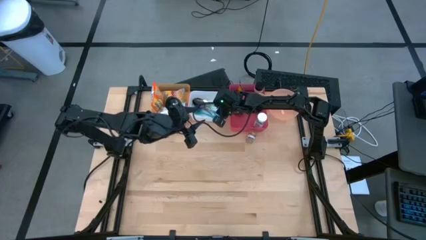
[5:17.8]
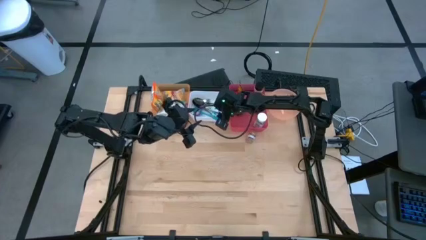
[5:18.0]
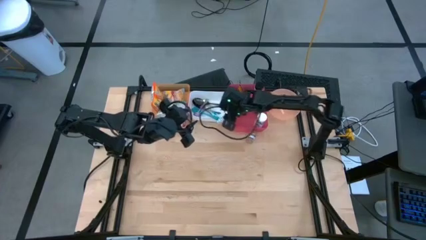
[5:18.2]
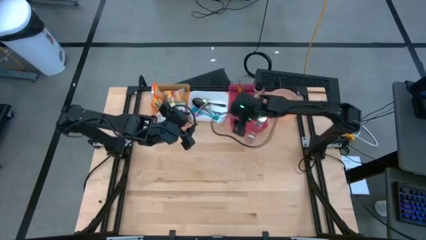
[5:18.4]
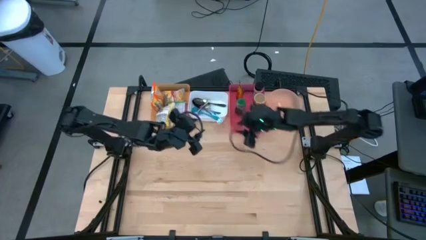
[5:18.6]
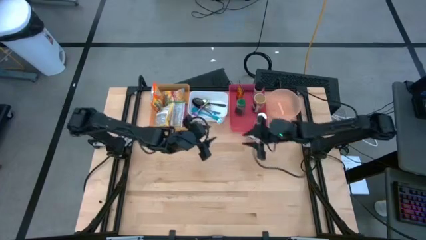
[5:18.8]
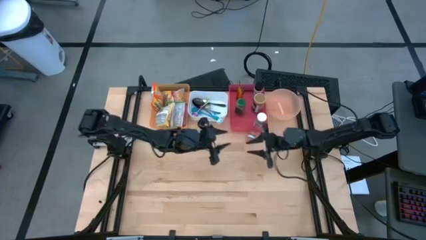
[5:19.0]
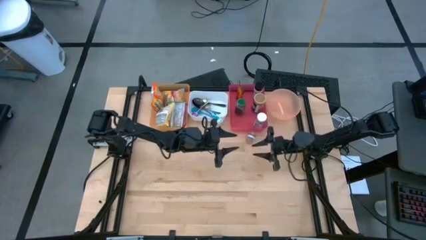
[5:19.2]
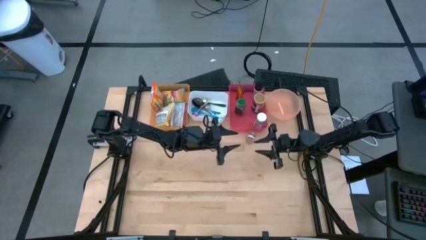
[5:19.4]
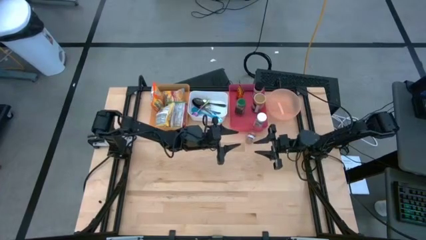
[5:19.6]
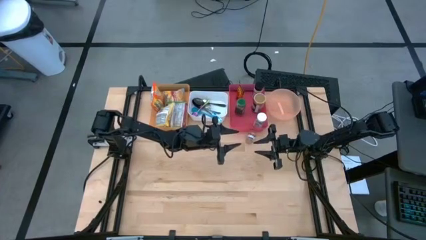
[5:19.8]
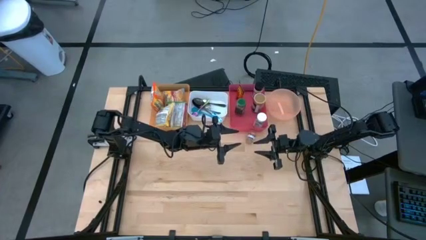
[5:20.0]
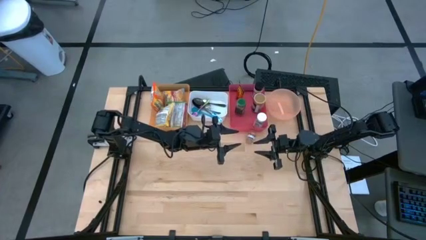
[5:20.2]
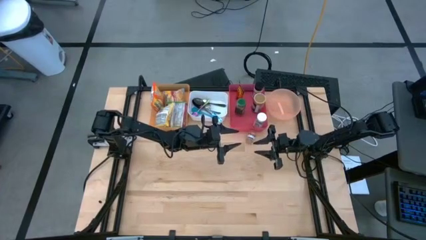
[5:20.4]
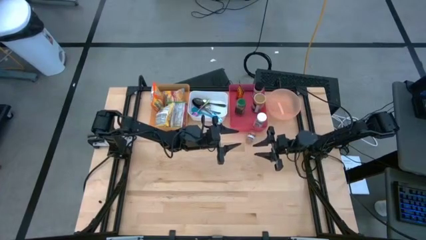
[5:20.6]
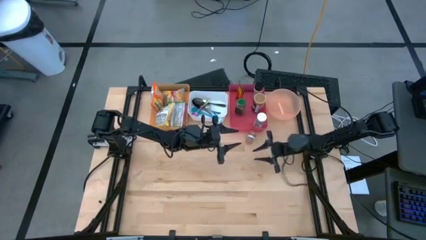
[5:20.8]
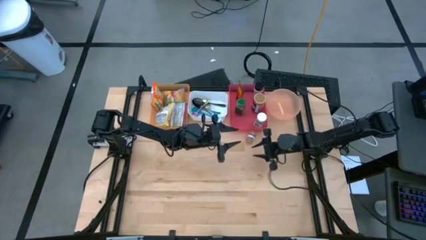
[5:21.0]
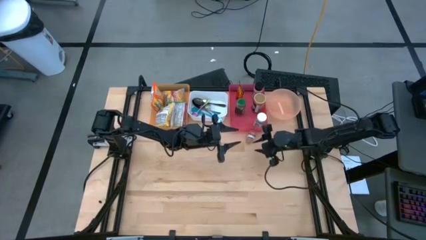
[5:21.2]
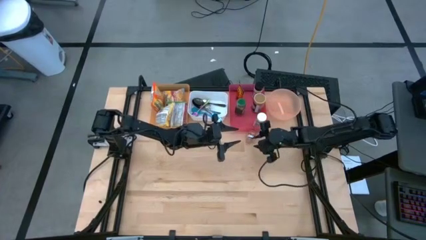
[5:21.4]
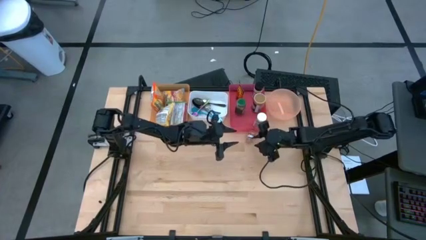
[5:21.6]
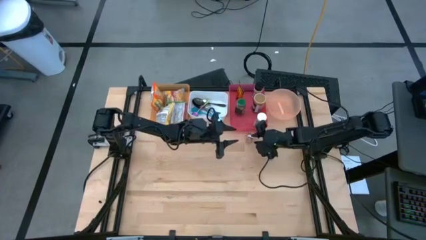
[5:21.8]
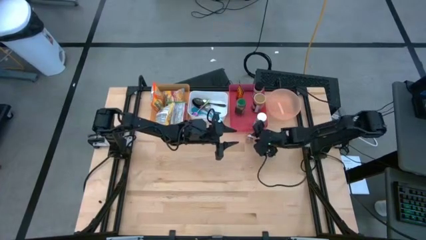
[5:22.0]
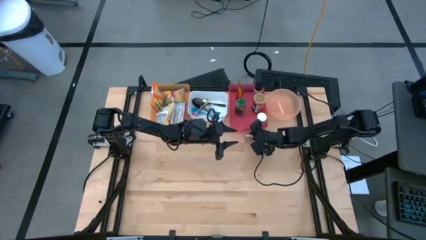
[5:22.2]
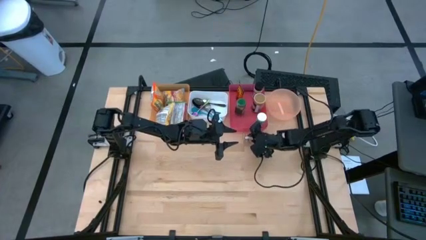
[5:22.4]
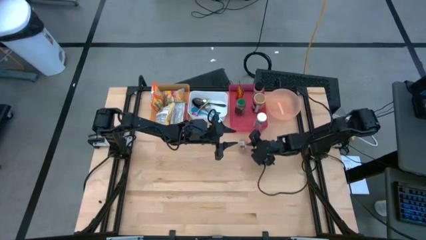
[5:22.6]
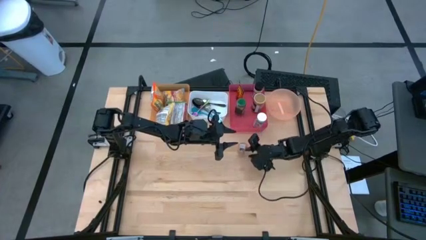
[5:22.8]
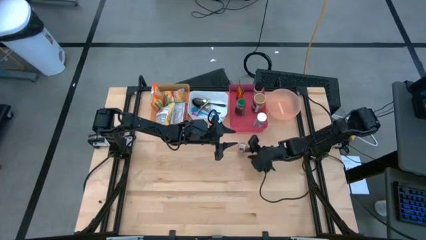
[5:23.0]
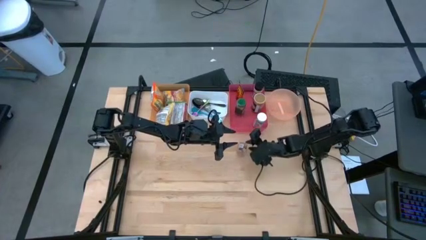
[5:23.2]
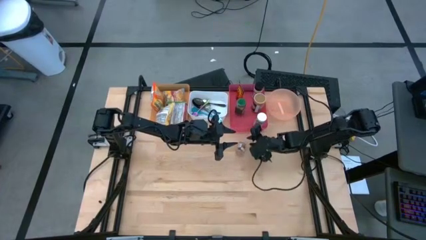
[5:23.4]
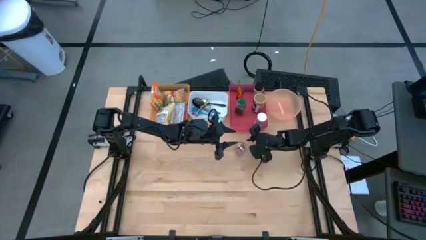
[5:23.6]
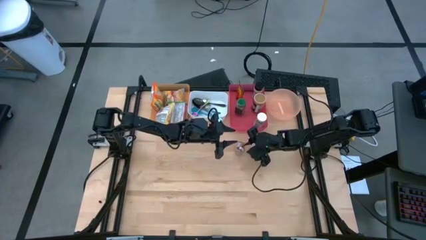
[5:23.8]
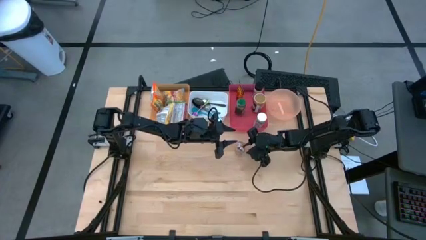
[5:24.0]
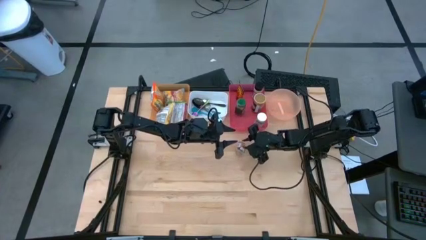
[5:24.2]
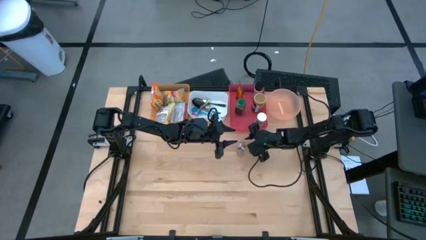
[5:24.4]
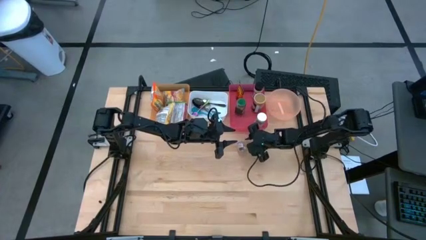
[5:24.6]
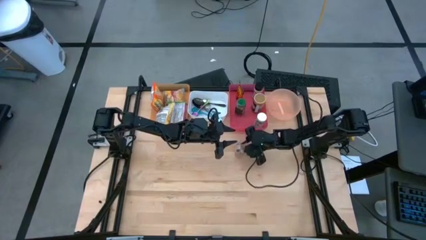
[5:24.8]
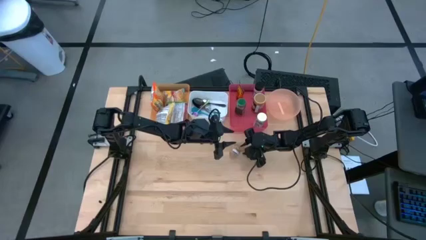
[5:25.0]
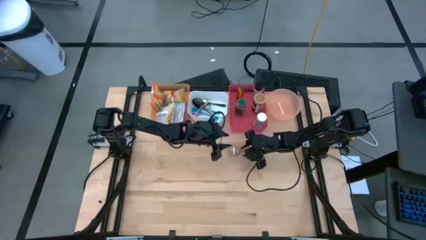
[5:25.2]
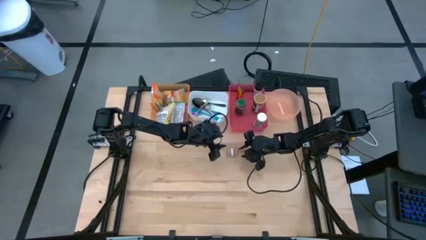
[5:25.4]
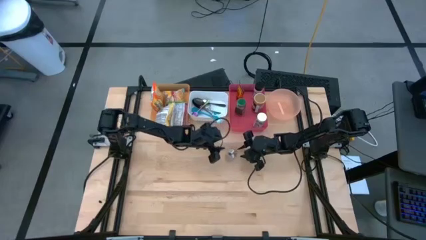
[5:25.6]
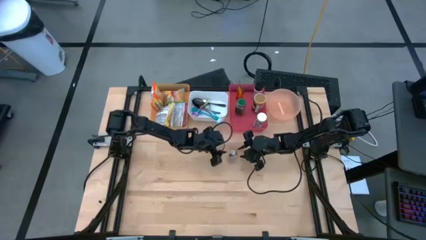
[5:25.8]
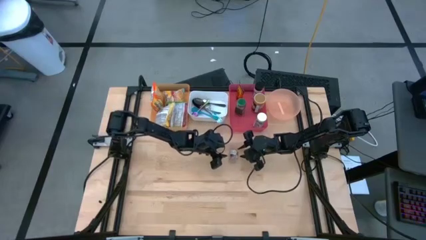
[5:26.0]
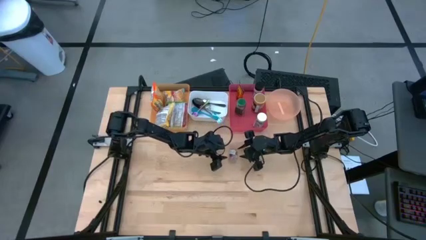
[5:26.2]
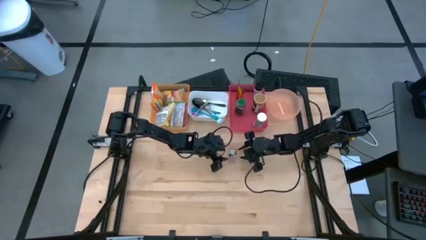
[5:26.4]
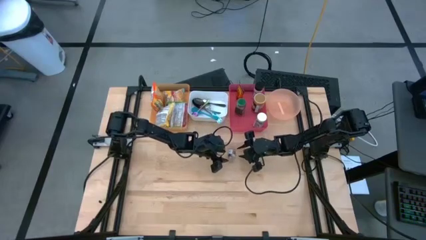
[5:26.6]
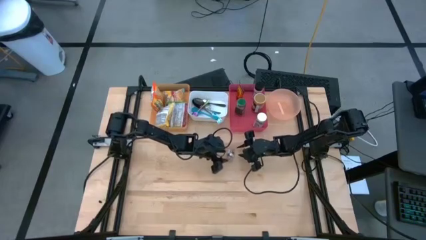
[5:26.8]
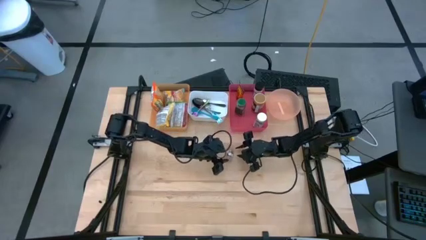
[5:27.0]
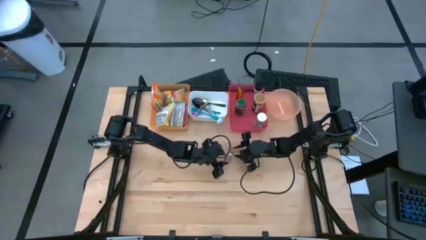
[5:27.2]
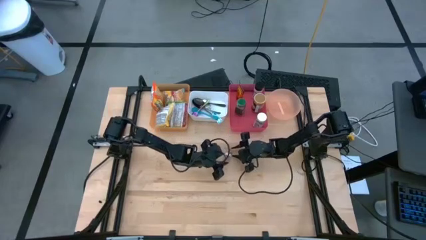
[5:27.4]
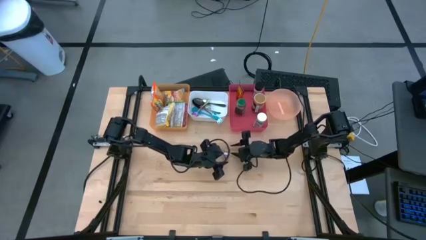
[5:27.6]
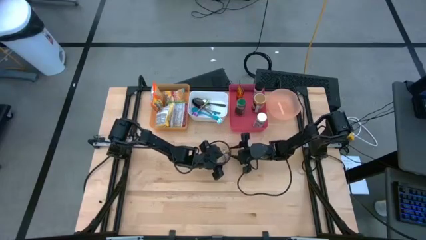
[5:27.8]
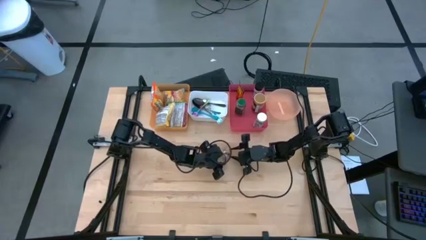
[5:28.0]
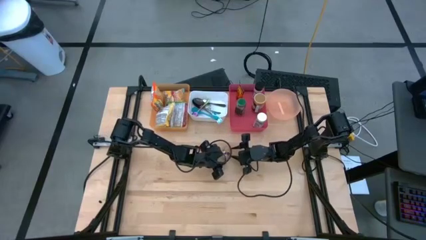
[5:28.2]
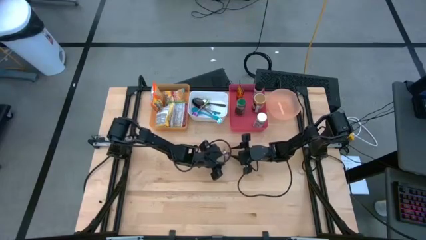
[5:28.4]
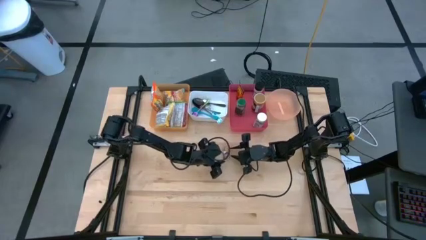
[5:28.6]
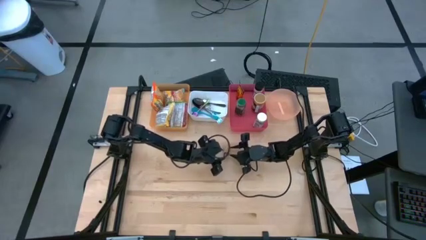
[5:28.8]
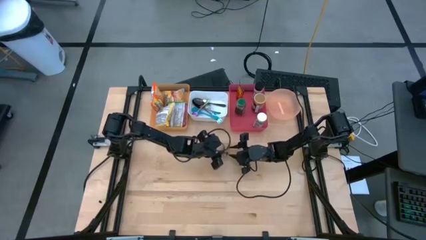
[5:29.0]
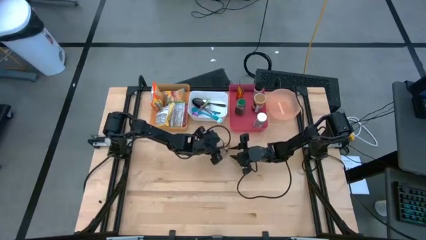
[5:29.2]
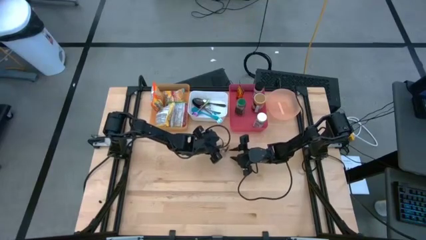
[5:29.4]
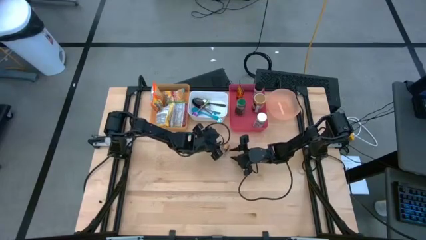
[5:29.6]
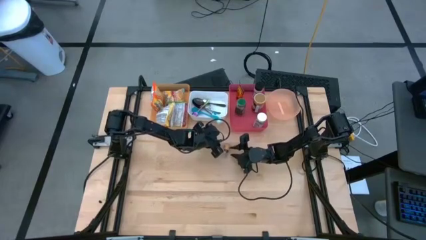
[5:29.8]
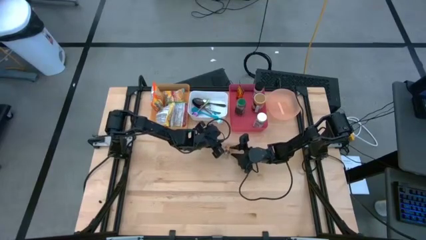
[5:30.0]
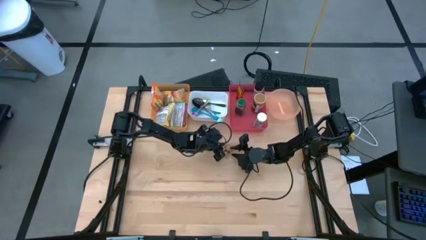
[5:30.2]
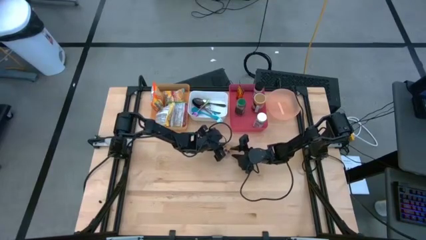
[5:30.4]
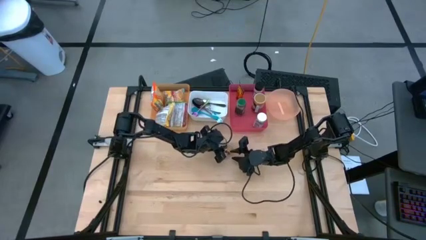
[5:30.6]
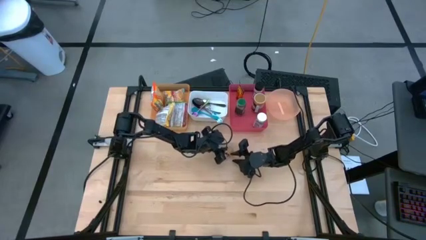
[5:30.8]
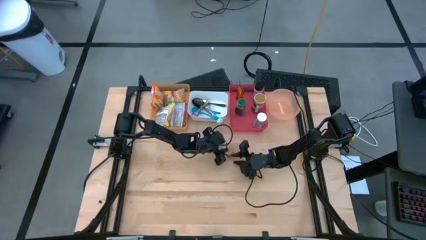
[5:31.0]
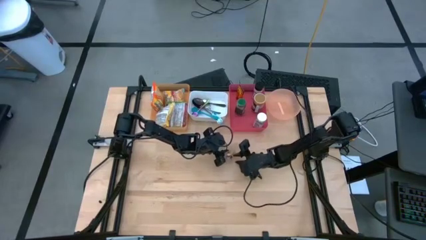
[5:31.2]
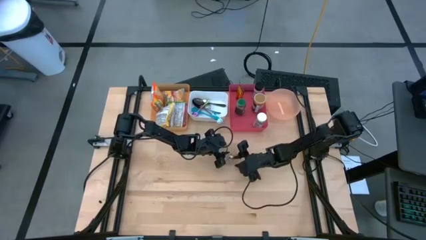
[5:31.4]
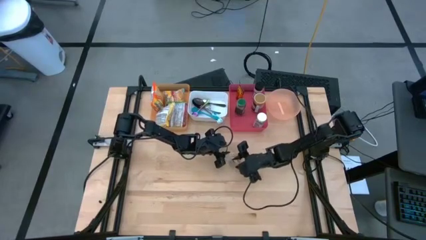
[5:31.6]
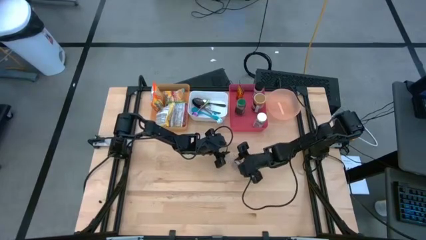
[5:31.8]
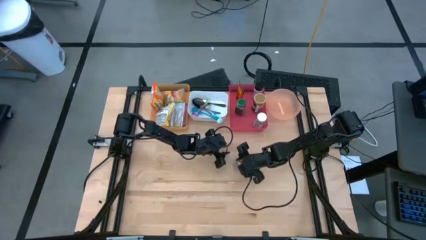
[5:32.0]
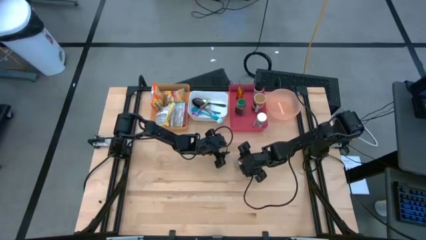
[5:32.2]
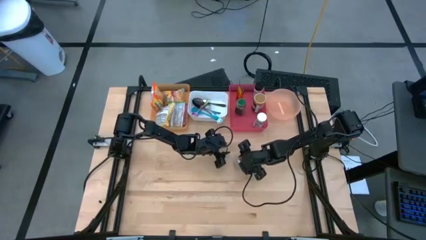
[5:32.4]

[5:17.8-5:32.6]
Task: Pick & Place Food Item
Put the brown seasoning bottle into the red bin
